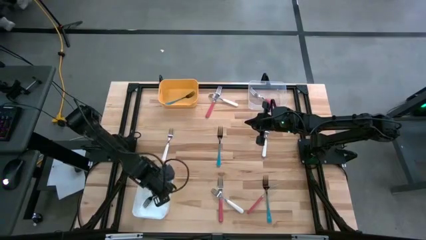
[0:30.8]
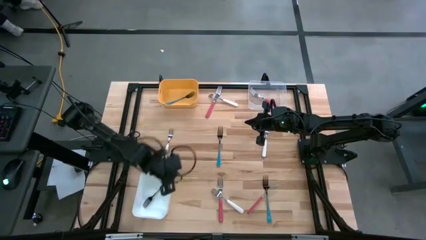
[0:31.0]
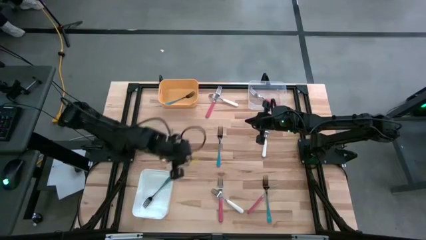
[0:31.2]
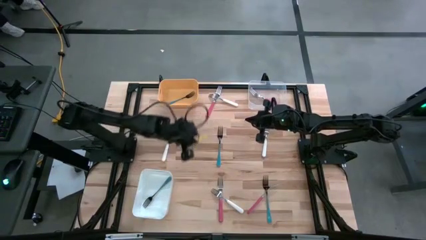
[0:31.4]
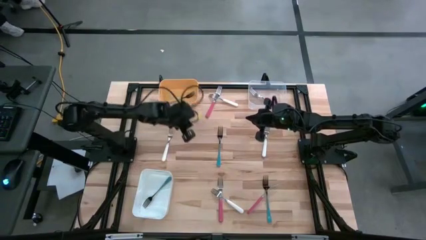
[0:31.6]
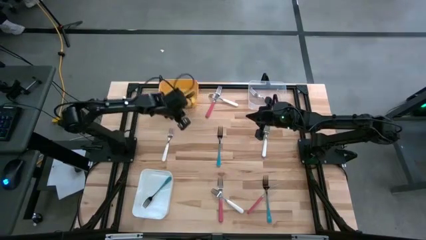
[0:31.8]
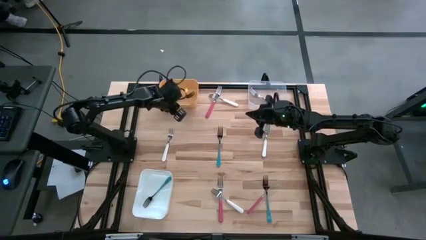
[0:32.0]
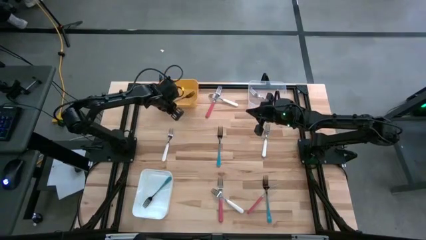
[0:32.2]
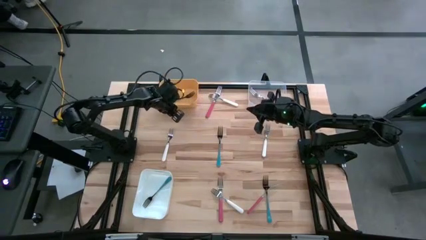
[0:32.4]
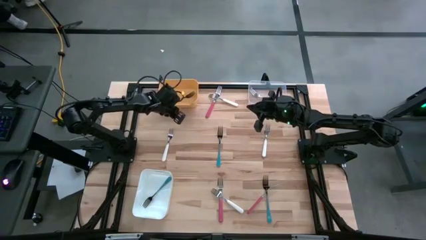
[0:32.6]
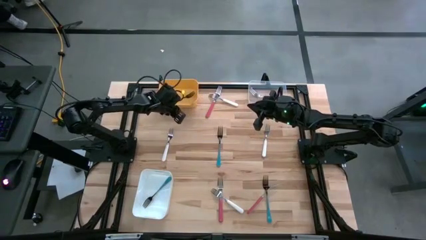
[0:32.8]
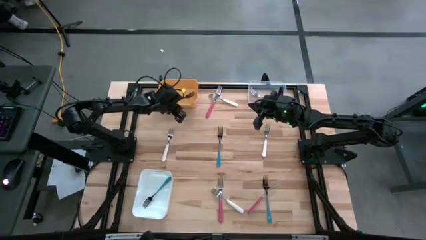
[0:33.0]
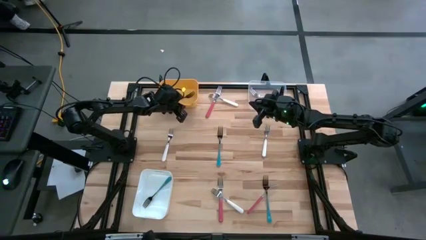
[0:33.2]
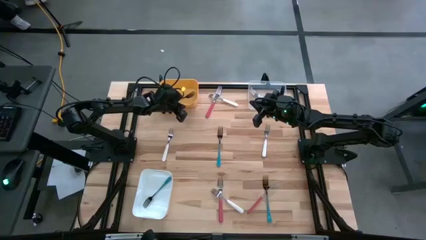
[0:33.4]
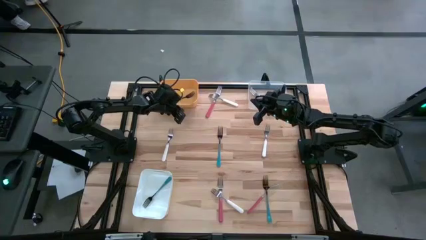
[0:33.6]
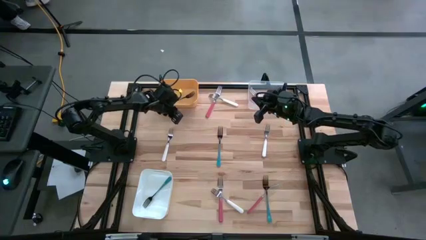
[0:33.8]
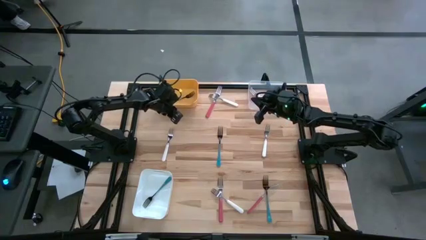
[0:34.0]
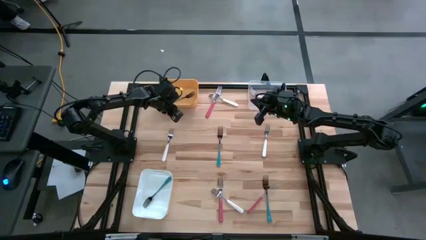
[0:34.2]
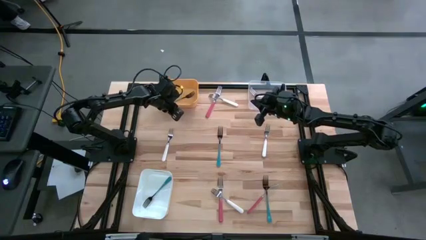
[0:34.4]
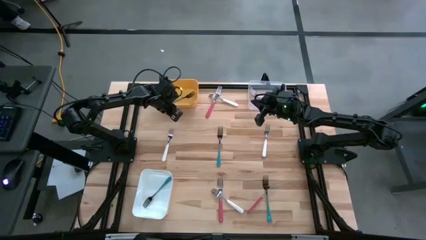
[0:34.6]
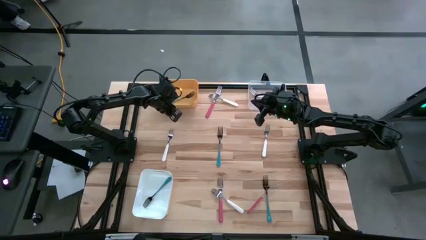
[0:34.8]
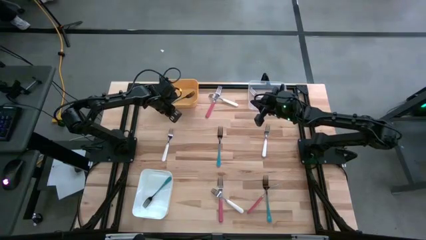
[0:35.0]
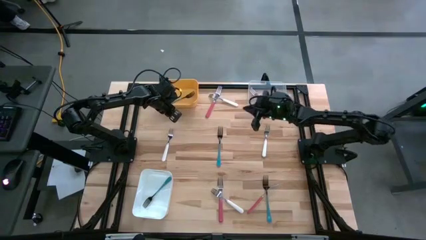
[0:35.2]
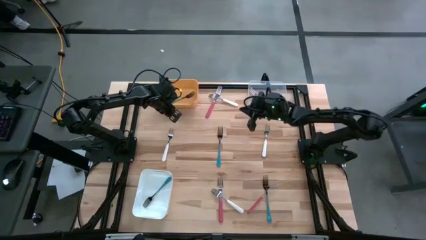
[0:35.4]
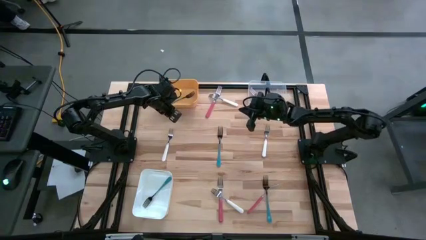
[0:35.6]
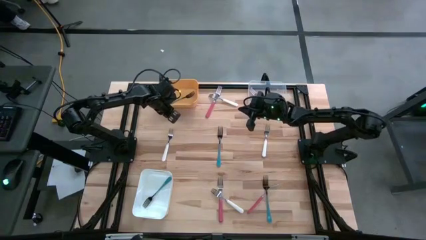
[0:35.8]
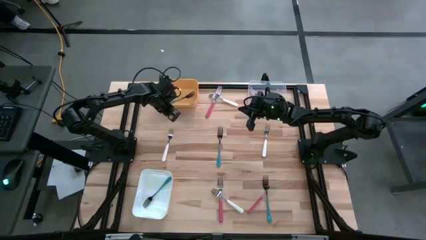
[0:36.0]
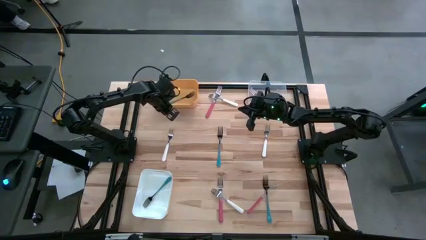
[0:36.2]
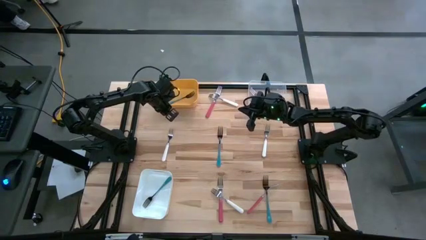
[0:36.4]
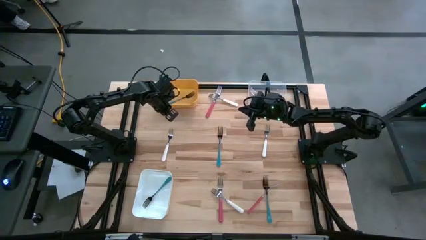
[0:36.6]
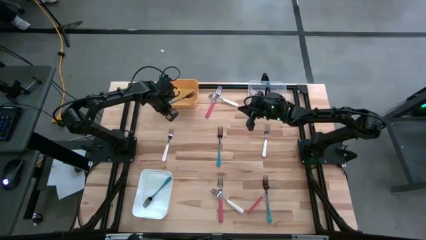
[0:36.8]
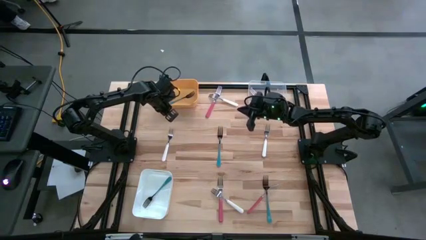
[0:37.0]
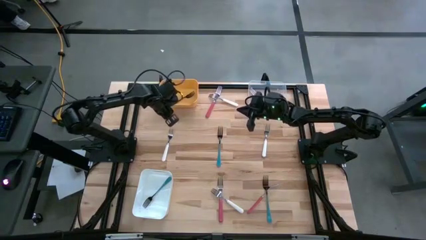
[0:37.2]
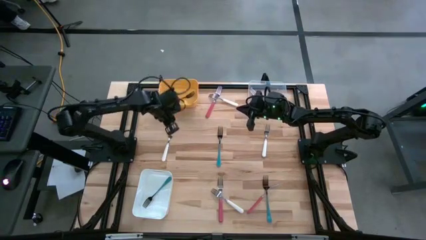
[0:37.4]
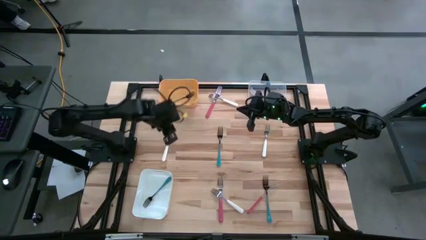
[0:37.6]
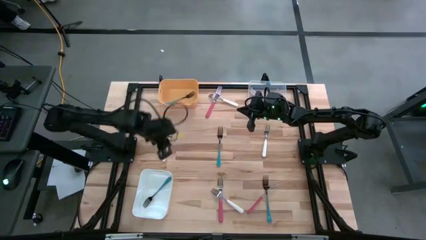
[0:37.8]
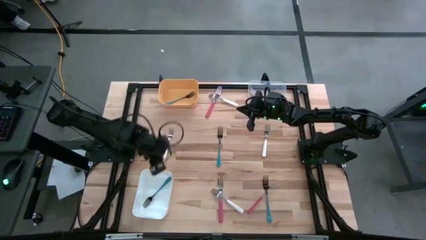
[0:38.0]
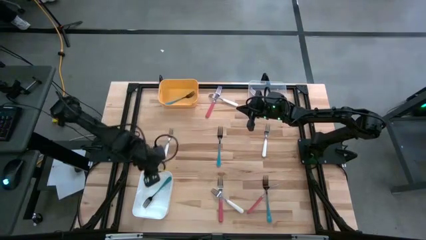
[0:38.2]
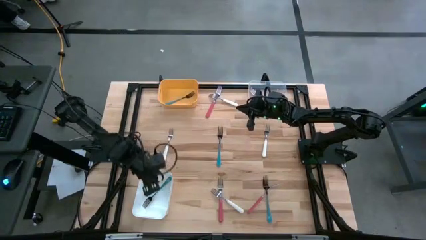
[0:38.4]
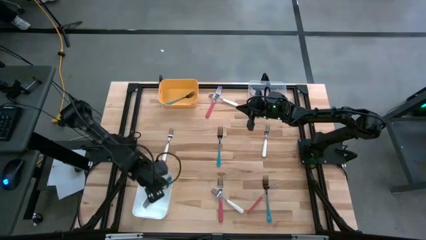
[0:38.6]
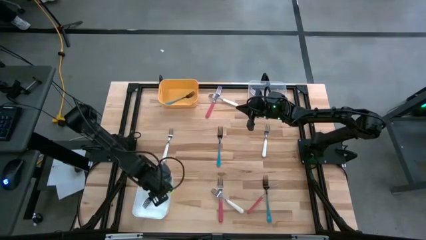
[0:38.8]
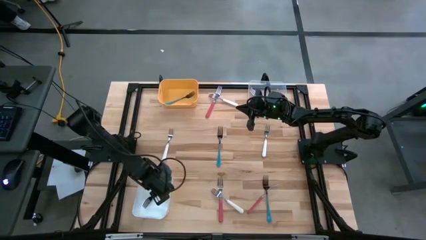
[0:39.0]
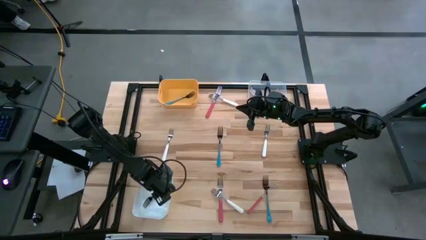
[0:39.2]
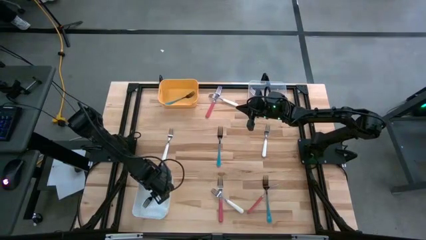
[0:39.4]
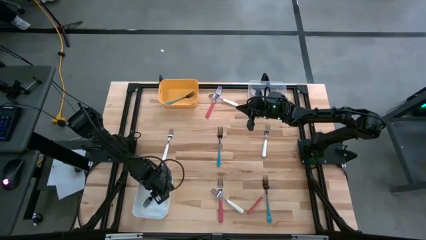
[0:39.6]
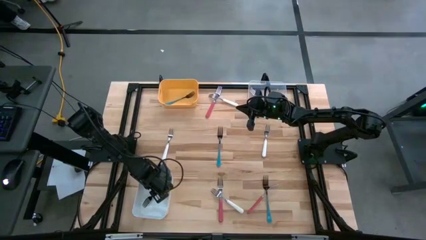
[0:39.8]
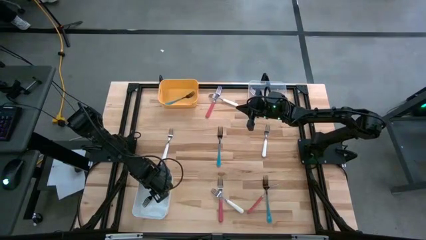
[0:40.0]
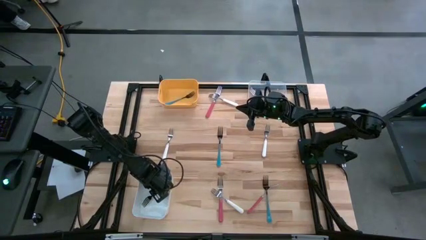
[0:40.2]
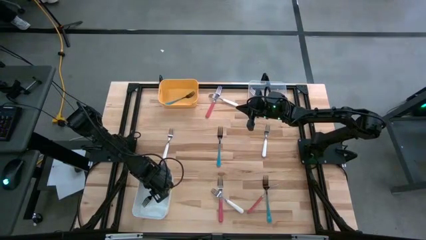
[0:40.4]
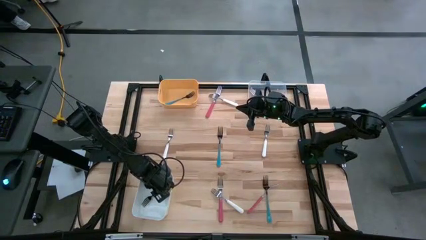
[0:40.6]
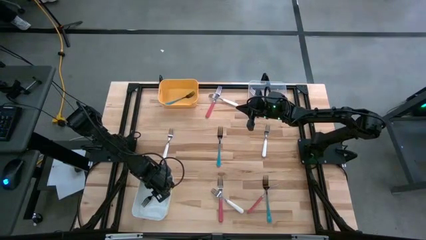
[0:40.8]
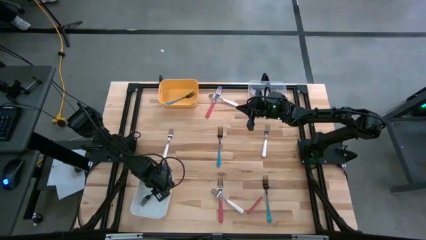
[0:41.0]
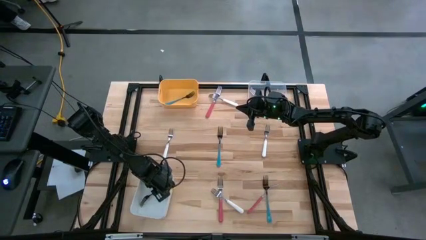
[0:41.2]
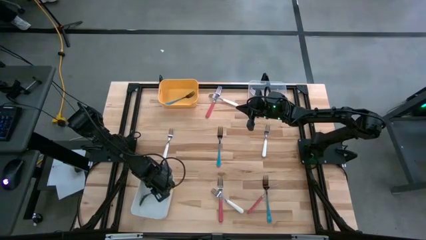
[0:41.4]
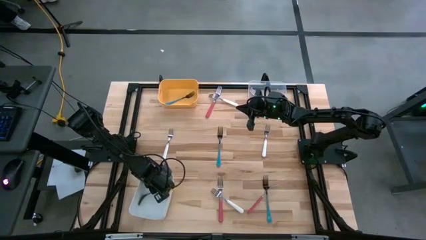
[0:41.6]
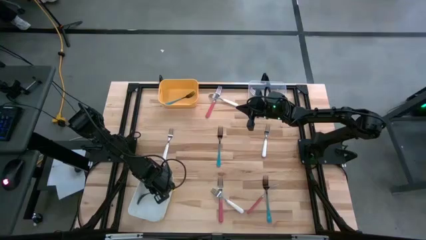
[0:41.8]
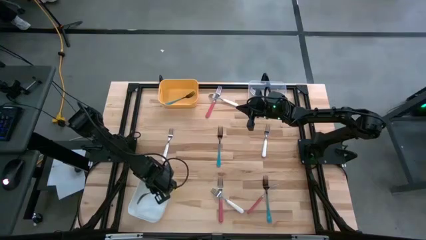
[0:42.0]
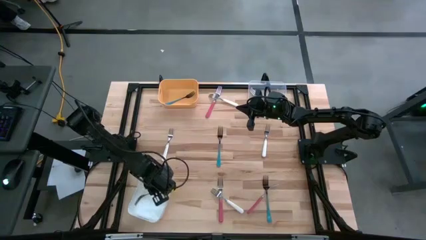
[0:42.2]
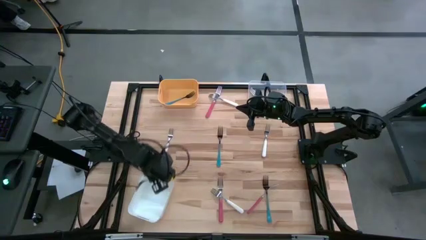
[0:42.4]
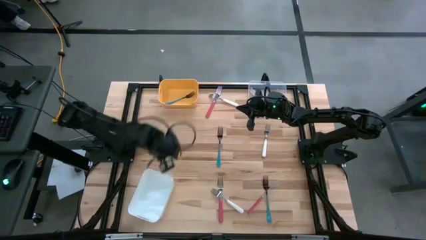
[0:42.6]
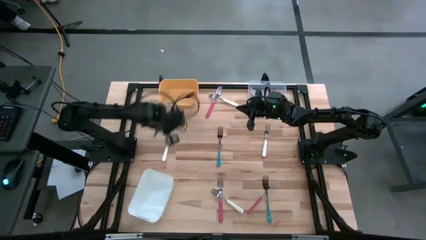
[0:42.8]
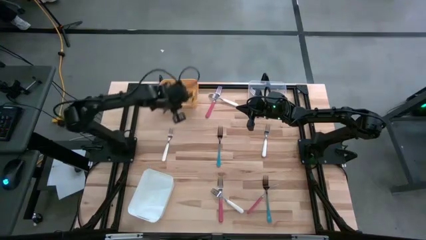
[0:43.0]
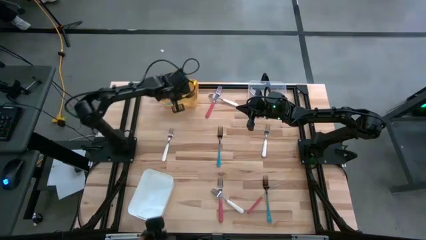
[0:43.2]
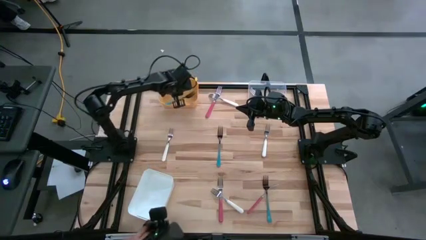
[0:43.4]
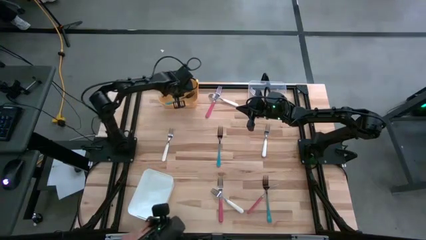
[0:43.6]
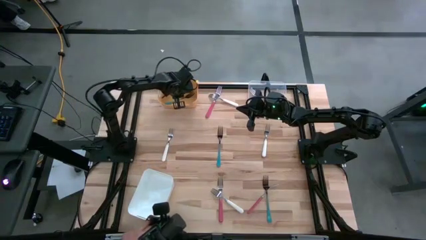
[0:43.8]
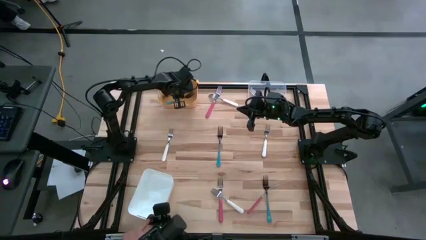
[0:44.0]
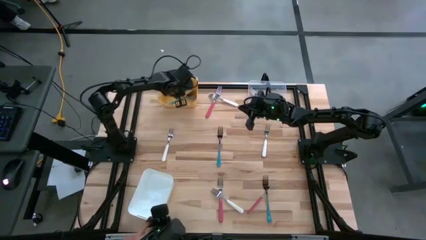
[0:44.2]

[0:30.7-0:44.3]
Task: Sort silverware by color (type)
Put the blue fork into the yellow bin

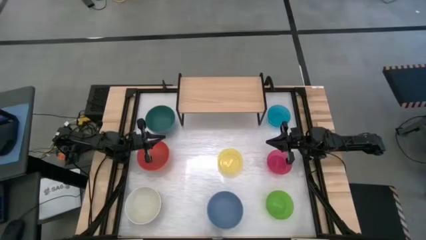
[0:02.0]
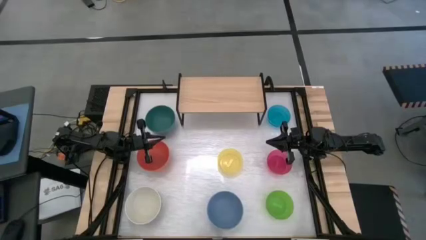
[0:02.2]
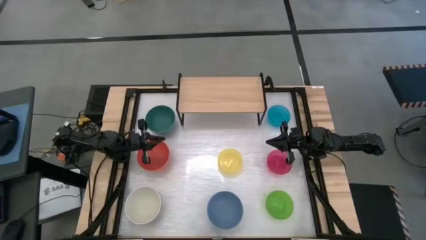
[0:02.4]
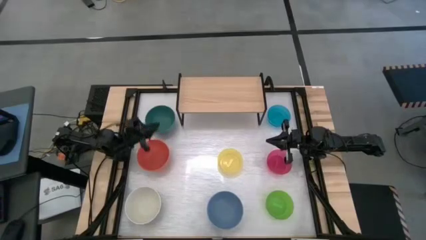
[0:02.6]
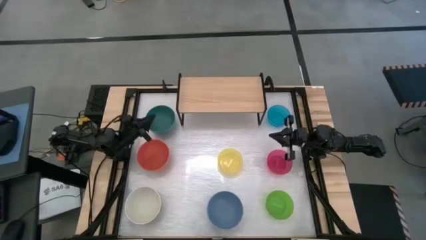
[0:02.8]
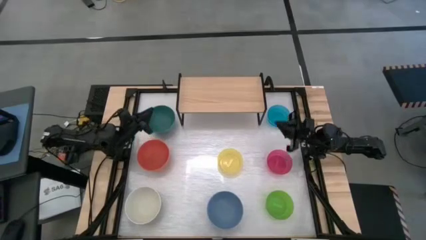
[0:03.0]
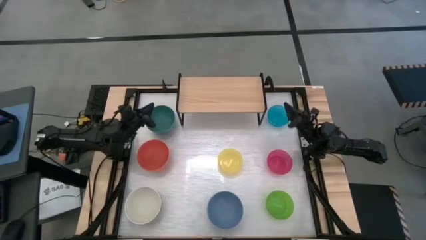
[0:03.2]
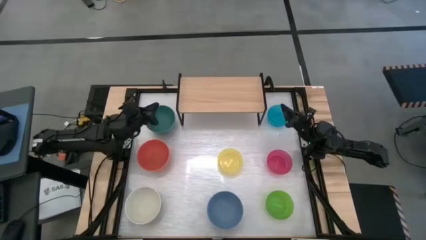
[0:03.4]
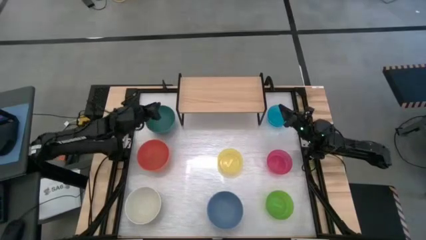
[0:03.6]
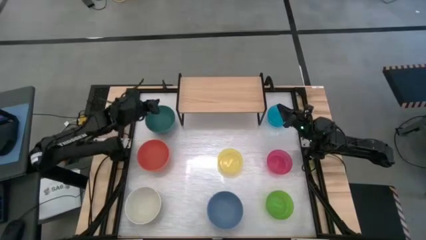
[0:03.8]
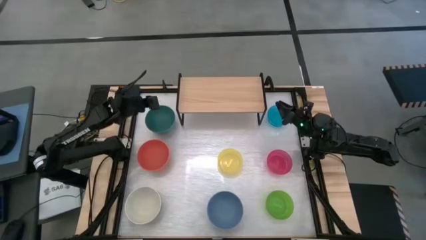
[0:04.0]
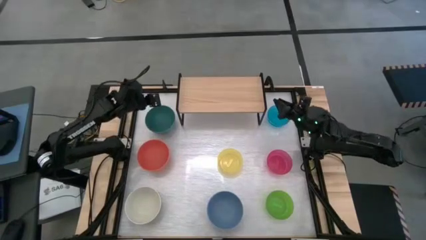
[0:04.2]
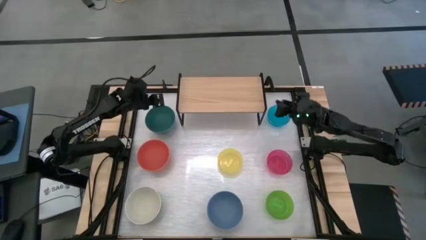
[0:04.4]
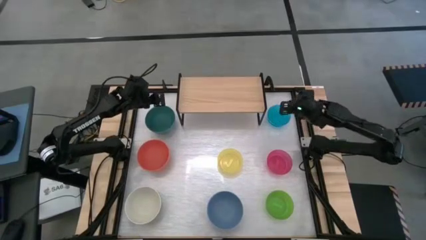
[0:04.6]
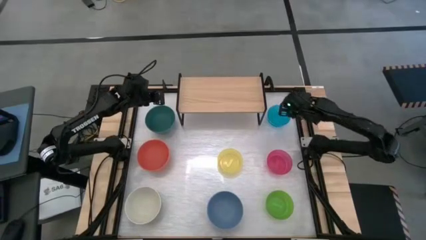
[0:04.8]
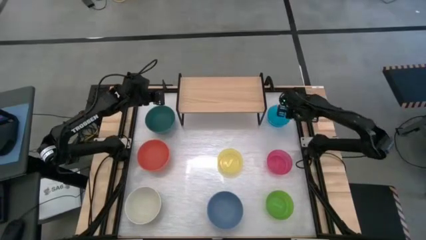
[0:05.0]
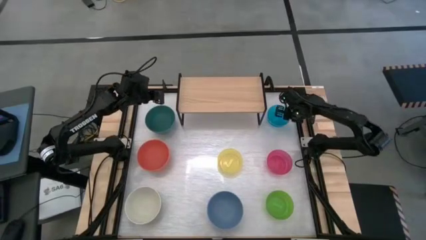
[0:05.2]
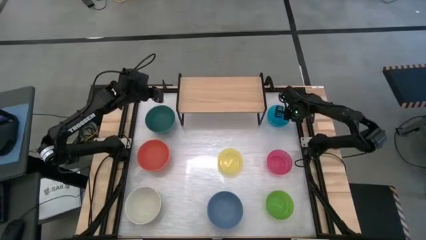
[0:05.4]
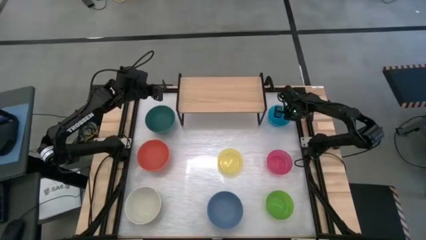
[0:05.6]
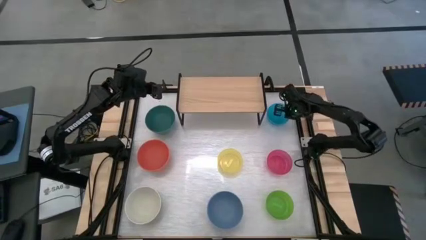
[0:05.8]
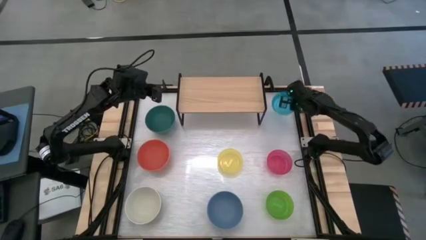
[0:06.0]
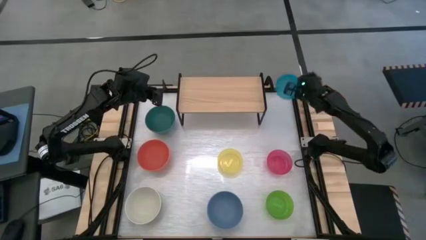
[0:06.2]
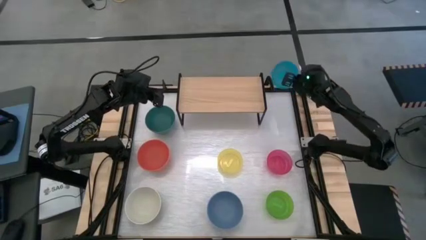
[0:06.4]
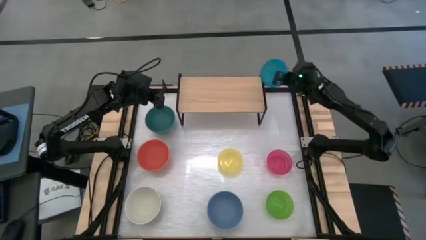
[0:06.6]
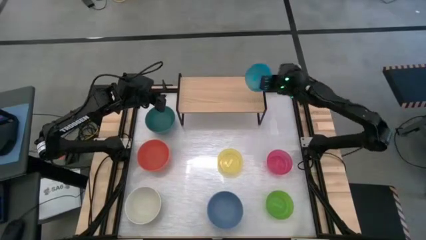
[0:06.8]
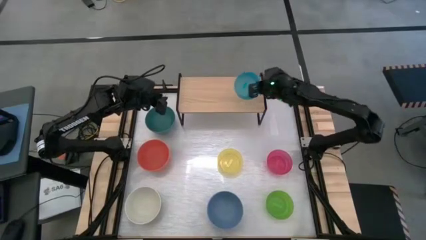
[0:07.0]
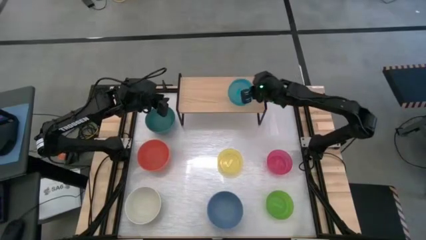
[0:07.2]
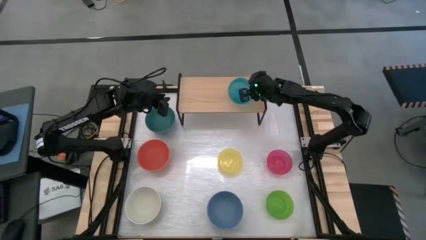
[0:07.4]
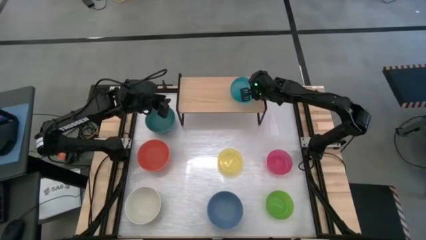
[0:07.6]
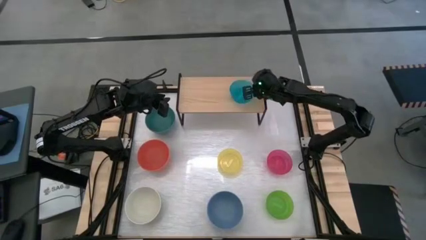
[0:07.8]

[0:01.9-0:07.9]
Task: Place and stack bowls onto a shelf
Put the light blue bowl on the shelf
